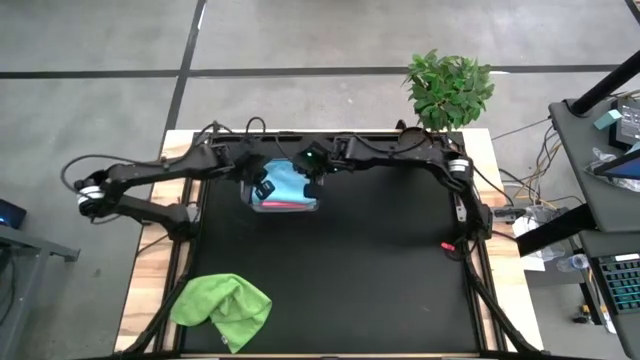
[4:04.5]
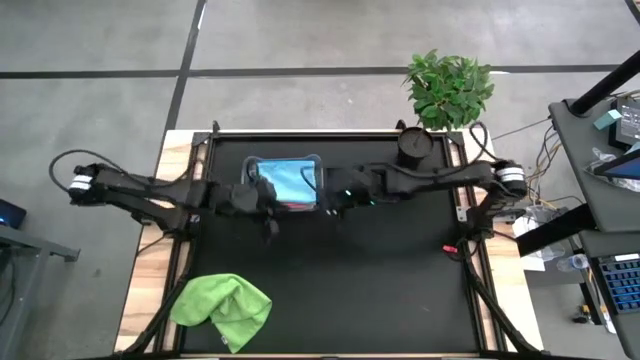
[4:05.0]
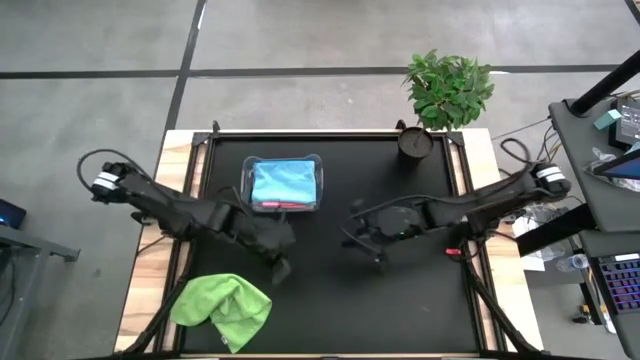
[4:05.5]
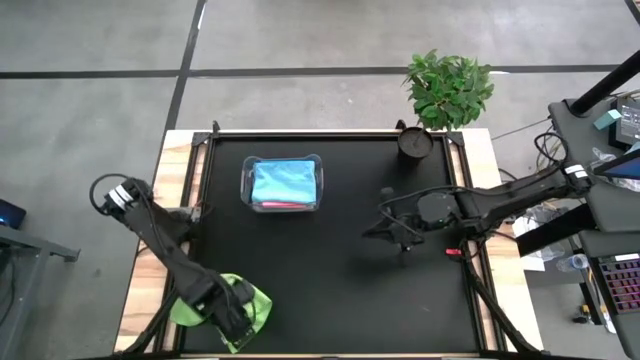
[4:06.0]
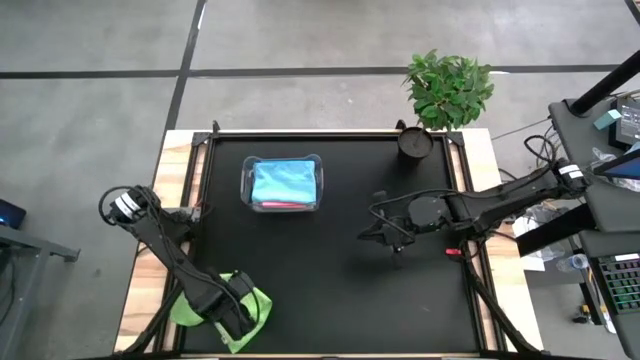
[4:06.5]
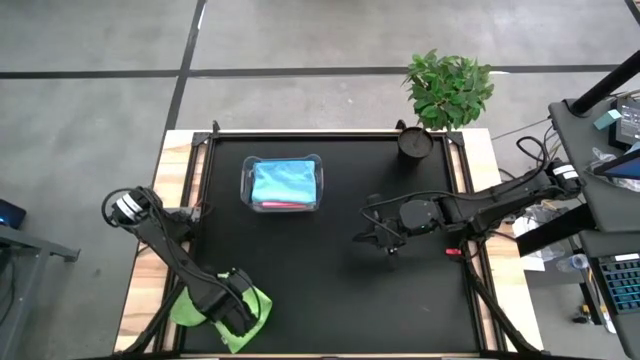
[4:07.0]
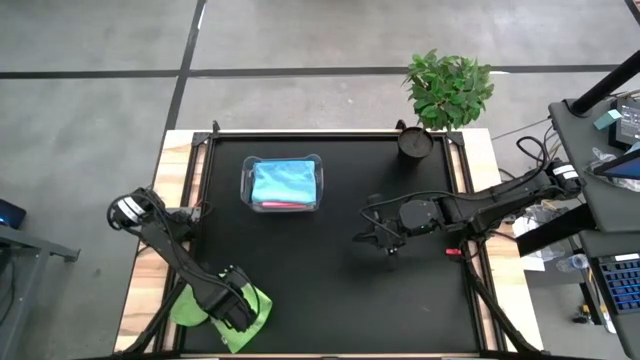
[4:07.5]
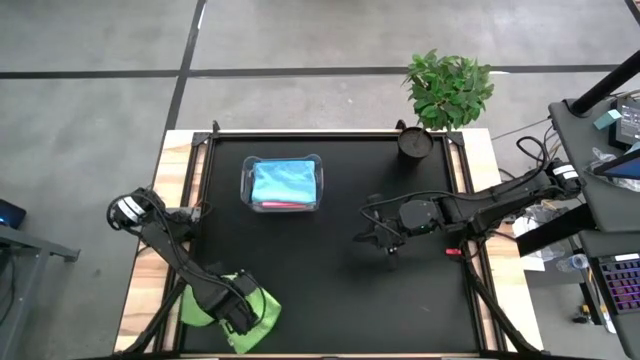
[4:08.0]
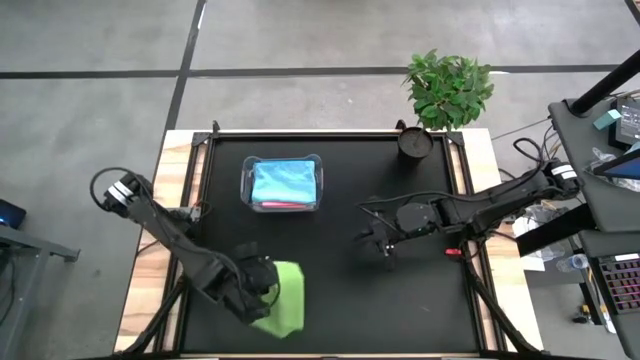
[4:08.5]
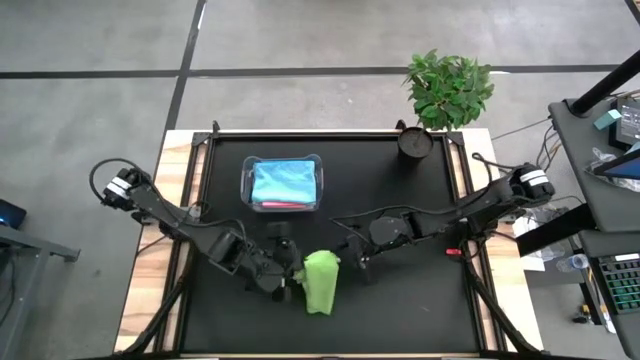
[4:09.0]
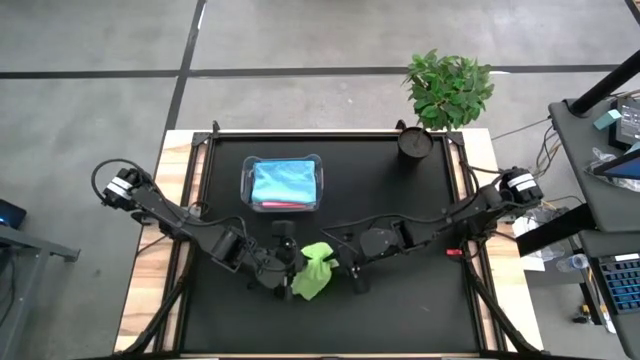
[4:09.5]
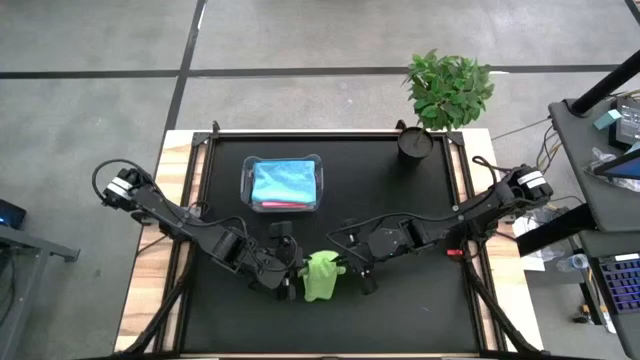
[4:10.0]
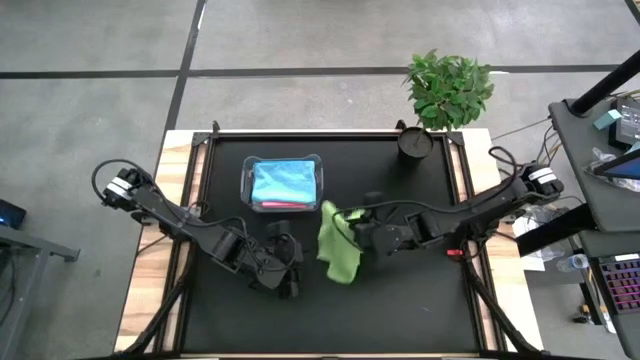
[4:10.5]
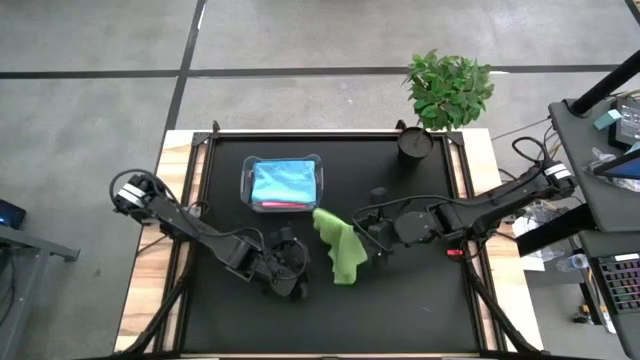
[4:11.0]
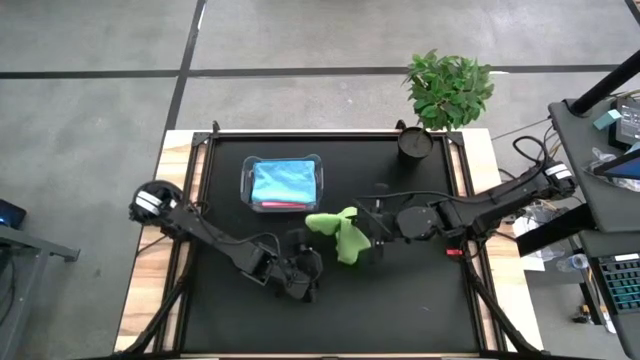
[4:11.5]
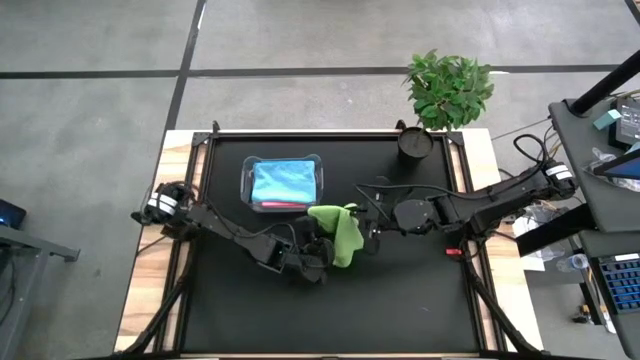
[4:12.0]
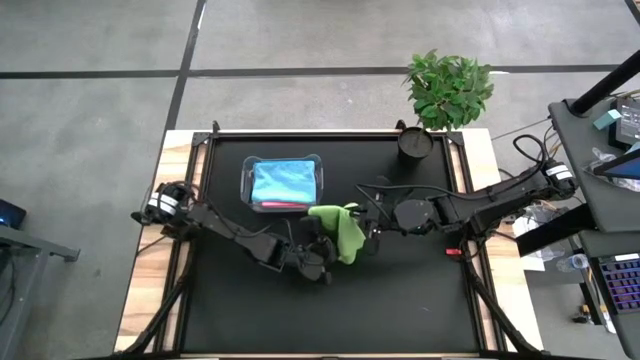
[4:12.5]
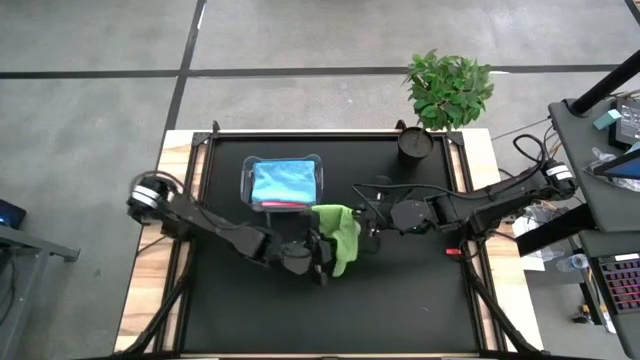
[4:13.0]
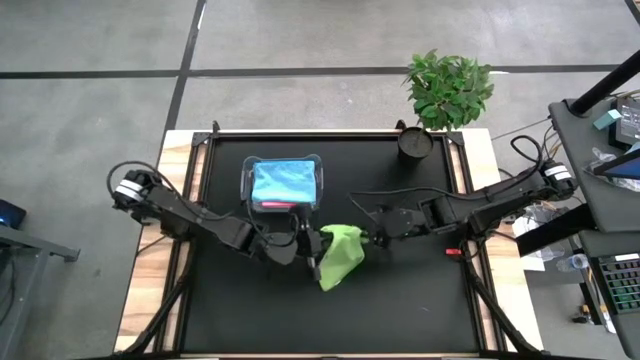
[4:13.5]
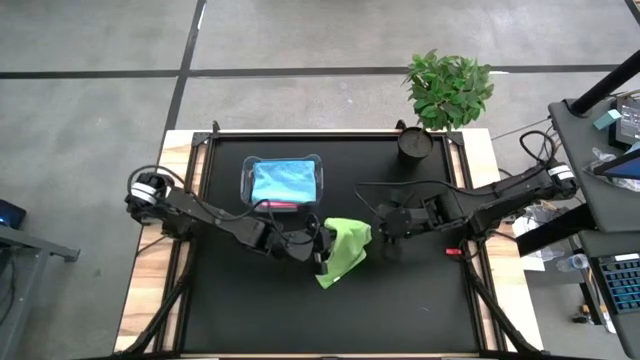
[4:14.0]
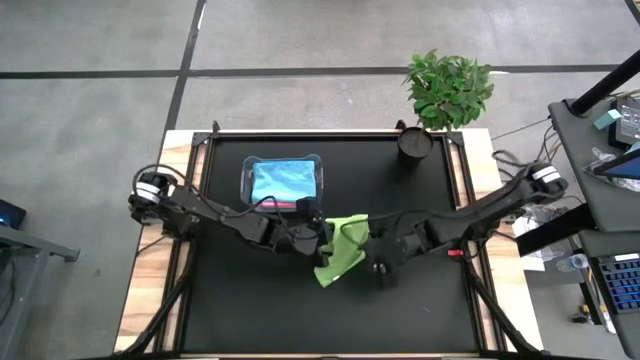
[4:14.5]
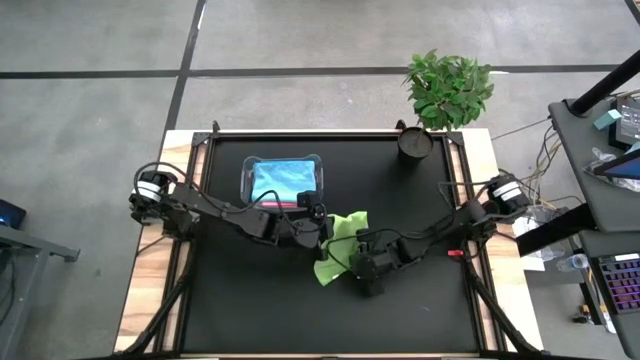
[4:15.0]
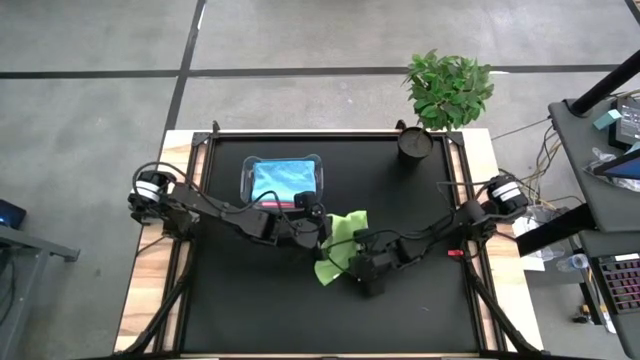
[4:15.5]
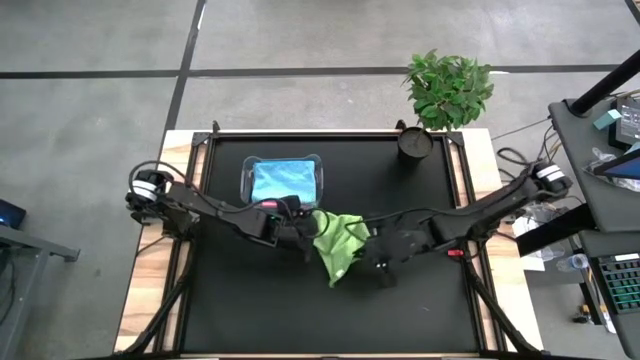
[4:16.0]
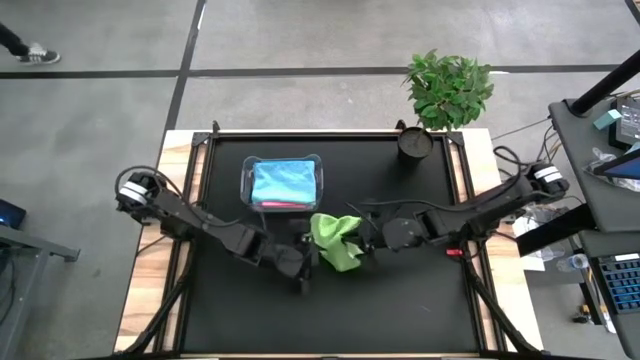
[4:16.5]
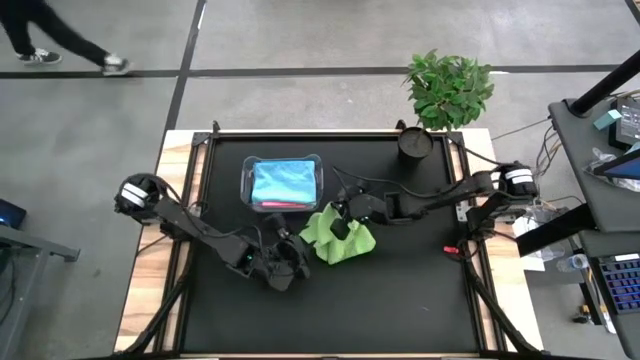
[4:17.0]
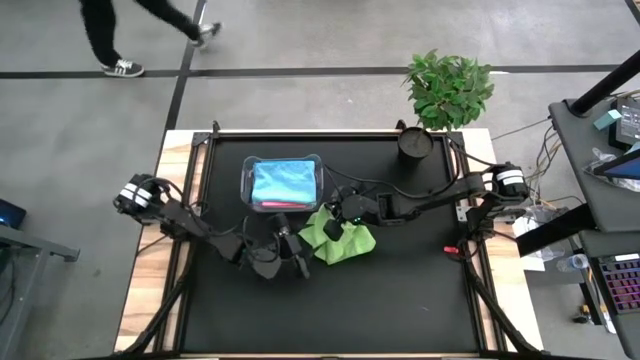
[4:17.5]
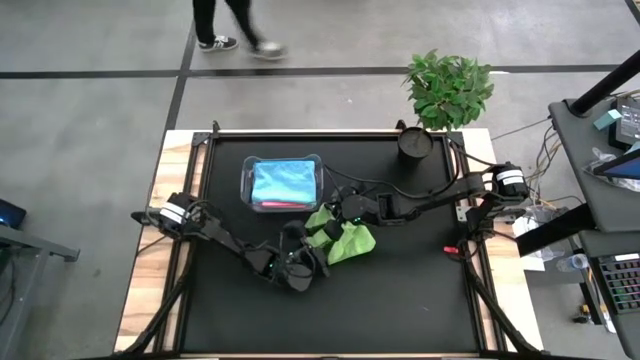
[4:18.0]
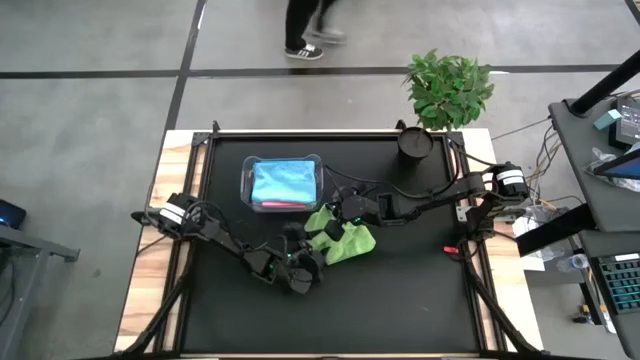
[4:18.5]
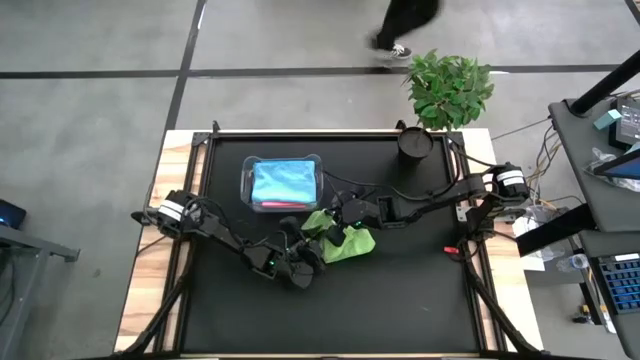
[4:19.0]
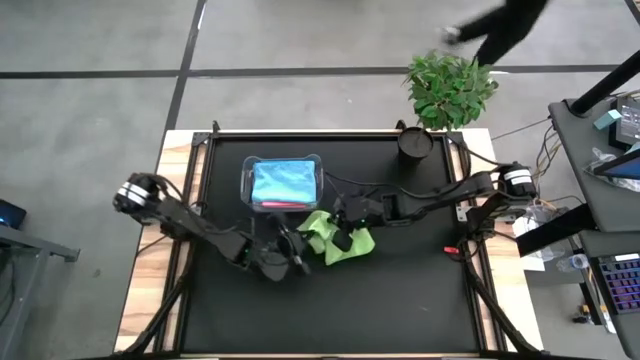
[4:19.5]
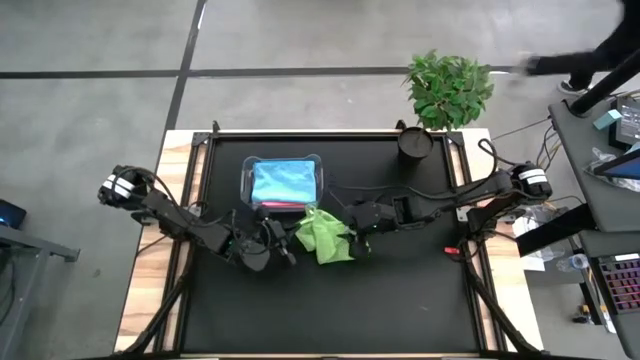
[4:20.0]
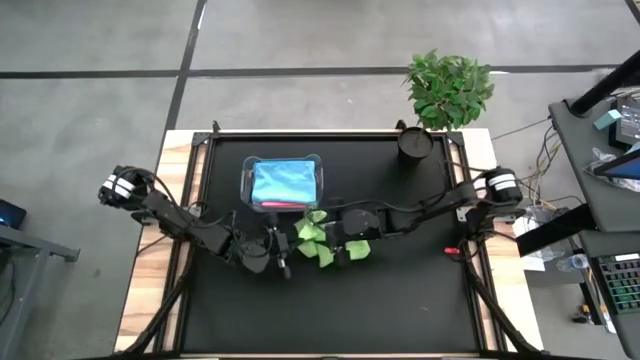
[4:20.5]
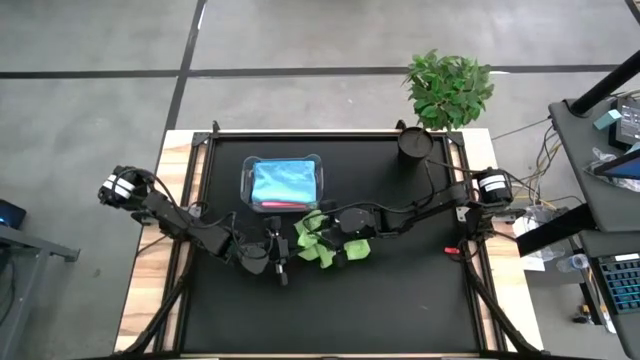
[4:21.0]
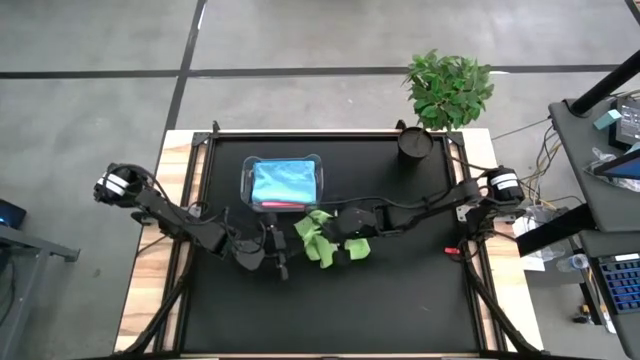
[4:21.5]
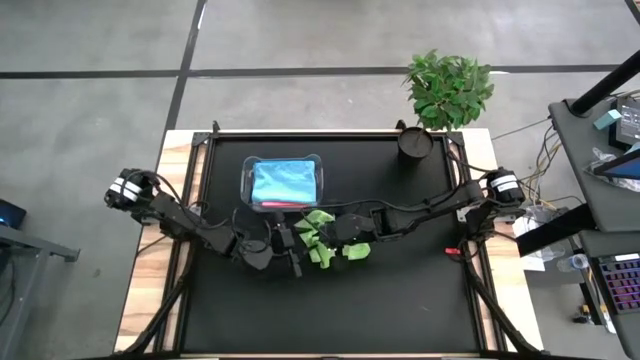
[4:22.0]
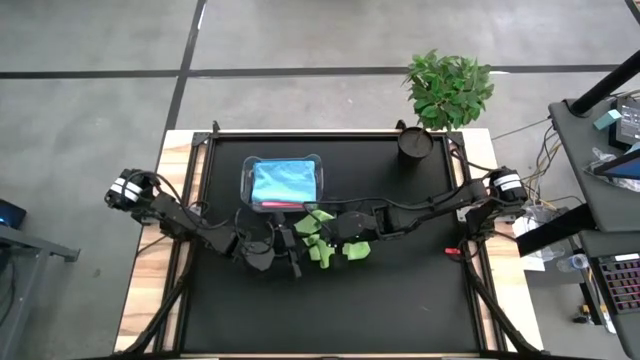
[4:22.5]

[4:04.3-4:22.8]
Task: Fold microfiber towels
Fold the green microfiber cloth

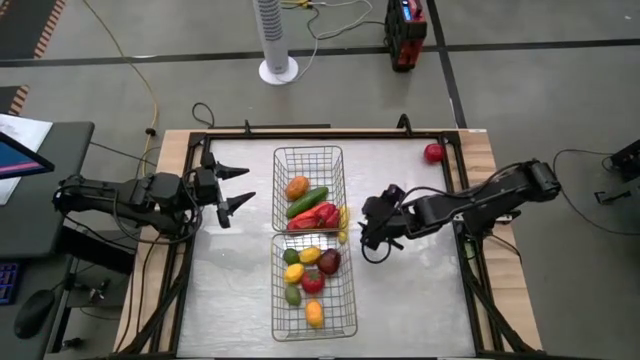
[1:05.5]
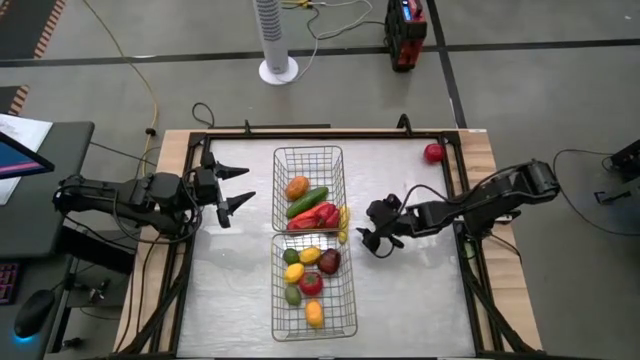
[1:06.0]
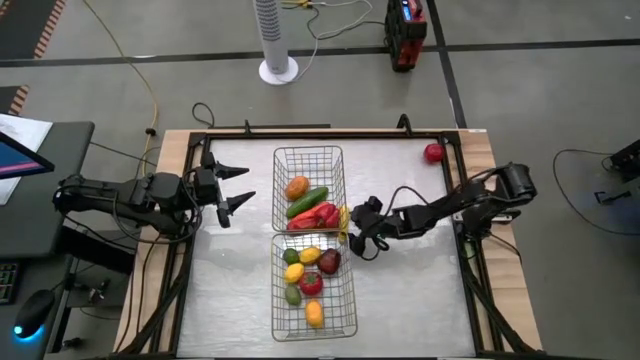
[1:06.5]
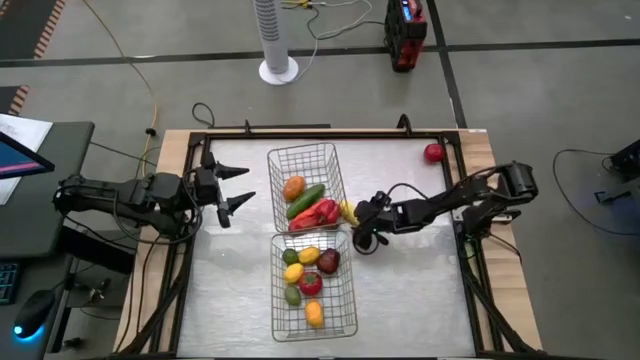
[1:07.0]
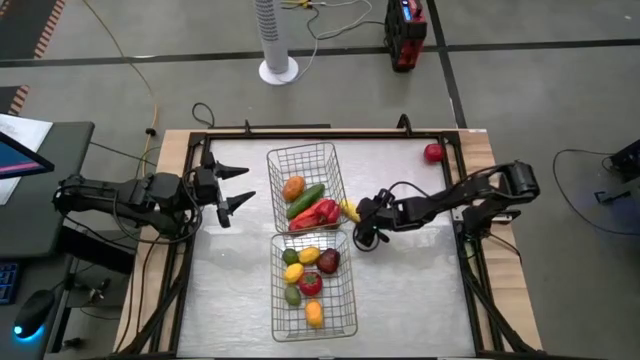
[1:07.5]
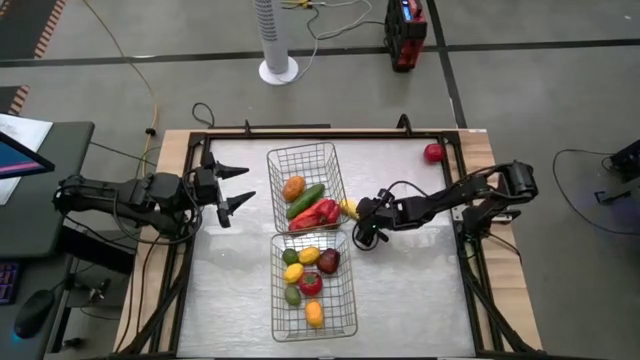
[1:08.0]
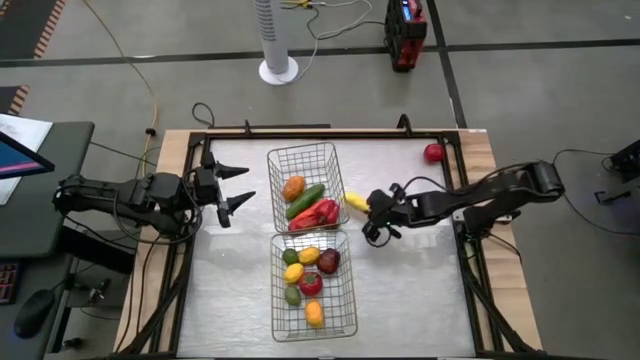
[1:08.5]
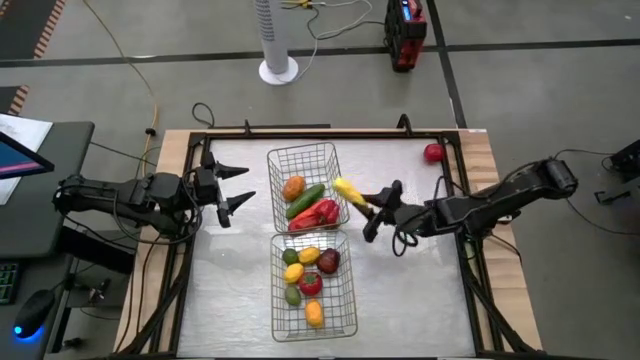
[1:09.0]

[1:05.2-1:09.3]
Task: Sort produce into baskets
Put the corn into the top wire basket
